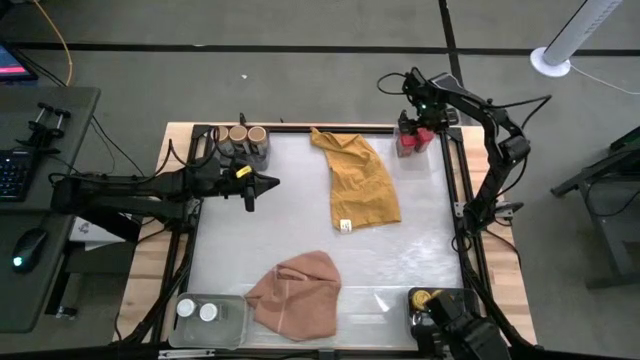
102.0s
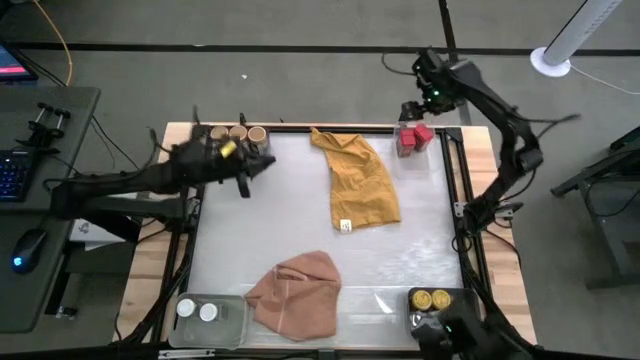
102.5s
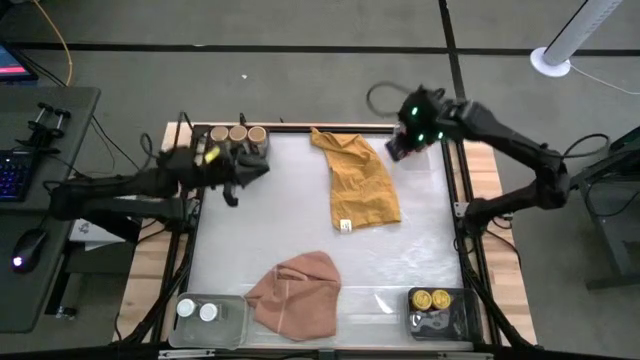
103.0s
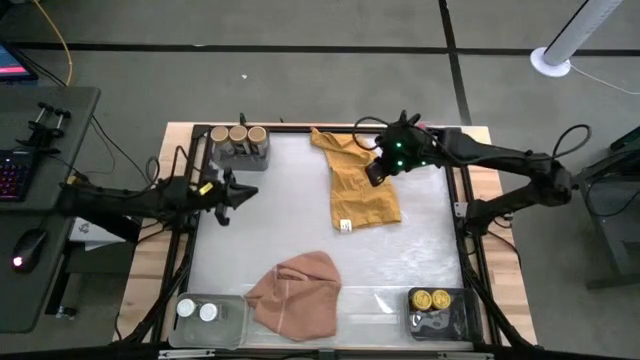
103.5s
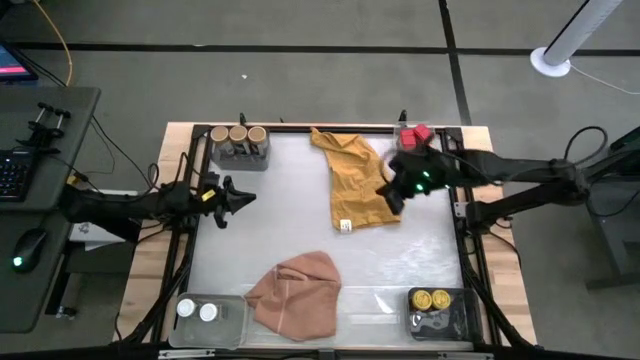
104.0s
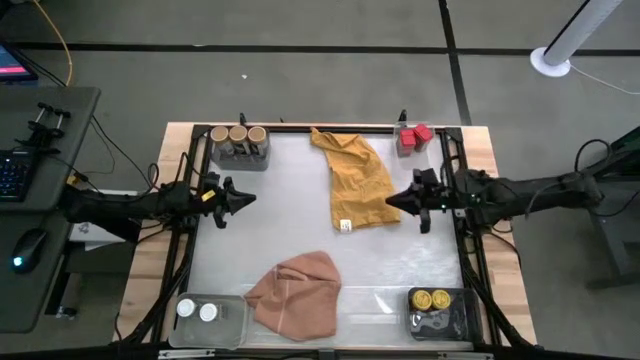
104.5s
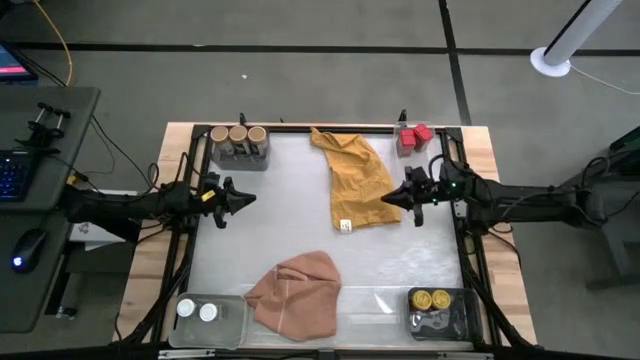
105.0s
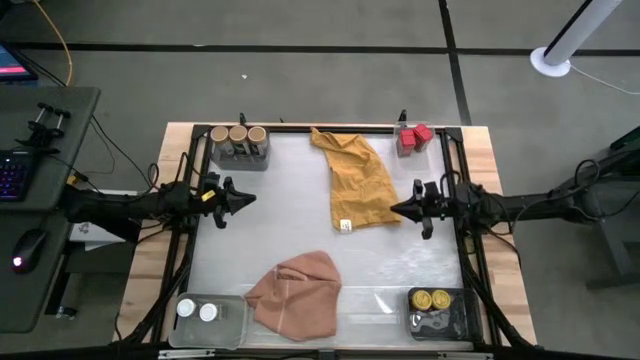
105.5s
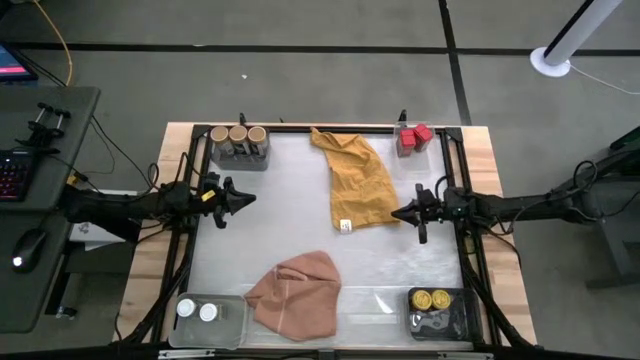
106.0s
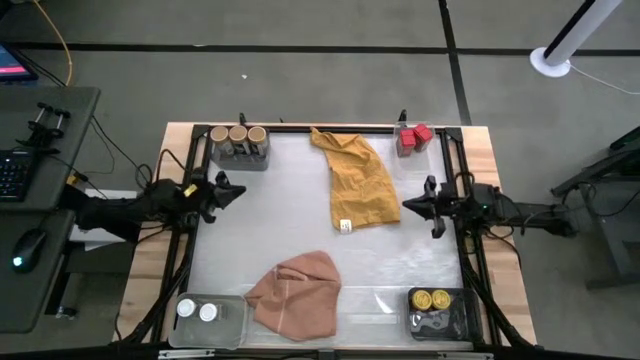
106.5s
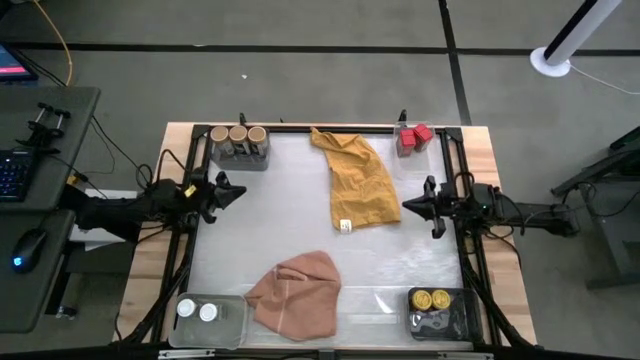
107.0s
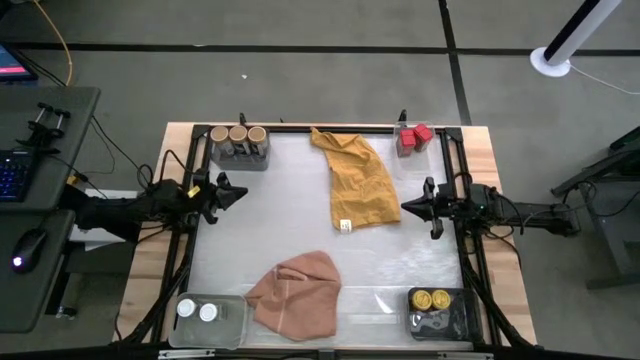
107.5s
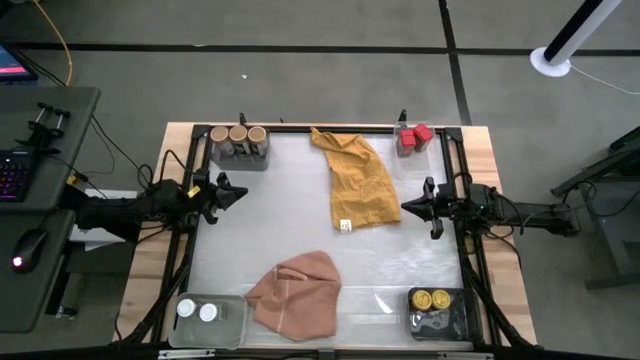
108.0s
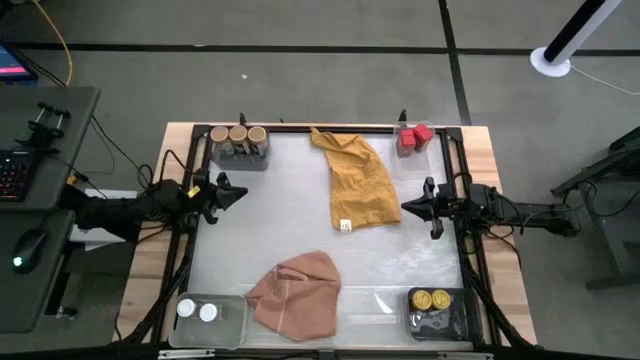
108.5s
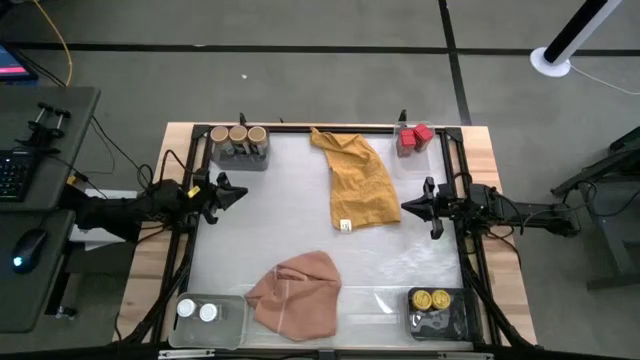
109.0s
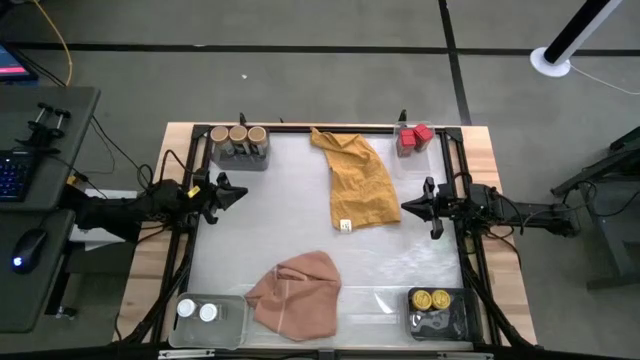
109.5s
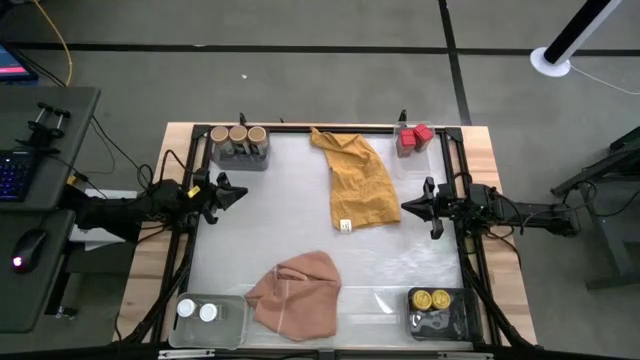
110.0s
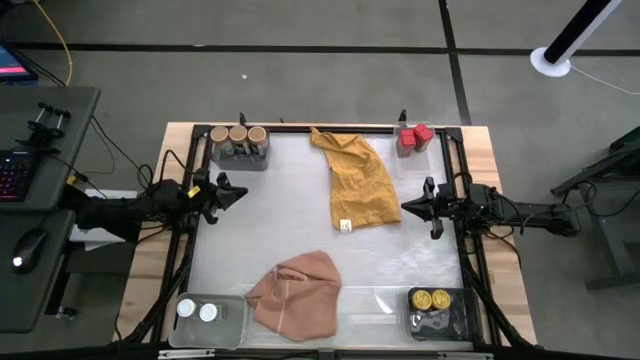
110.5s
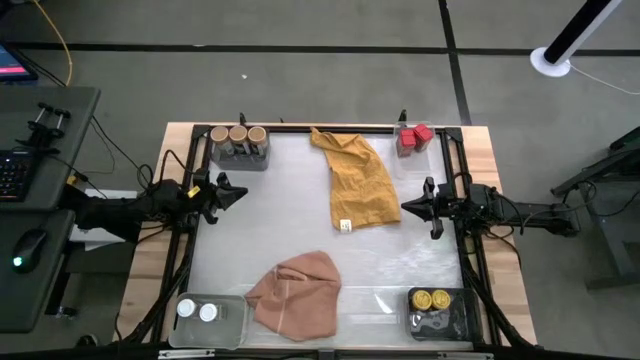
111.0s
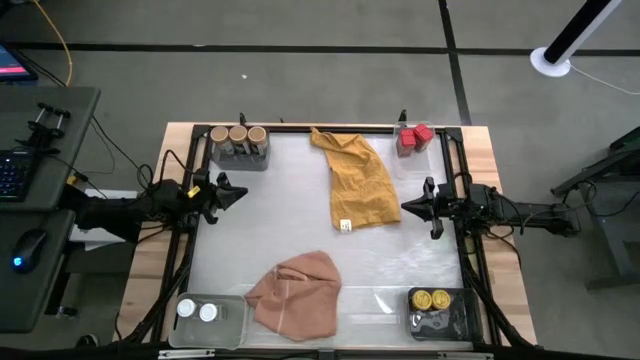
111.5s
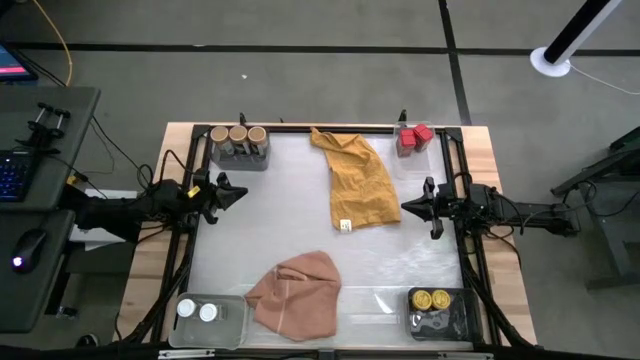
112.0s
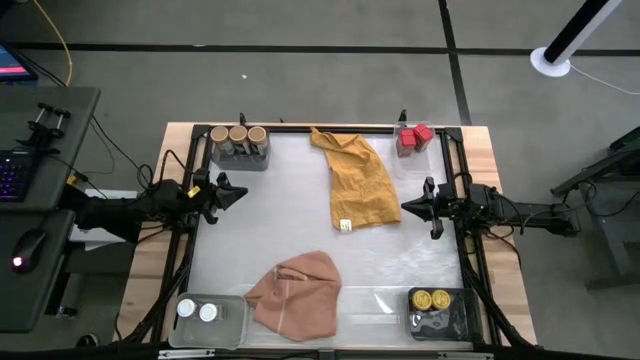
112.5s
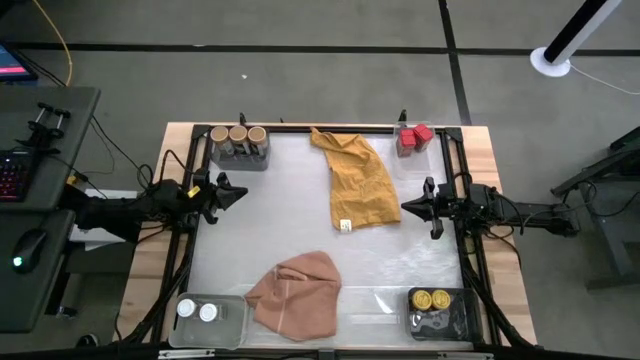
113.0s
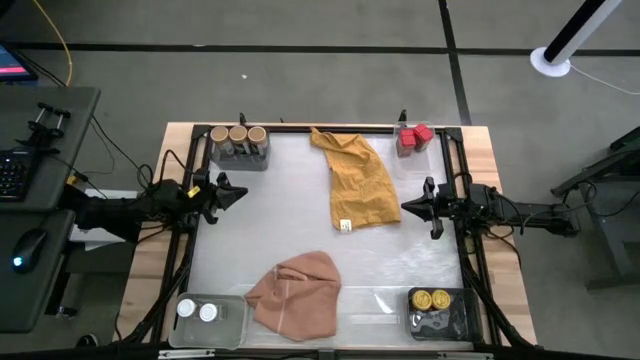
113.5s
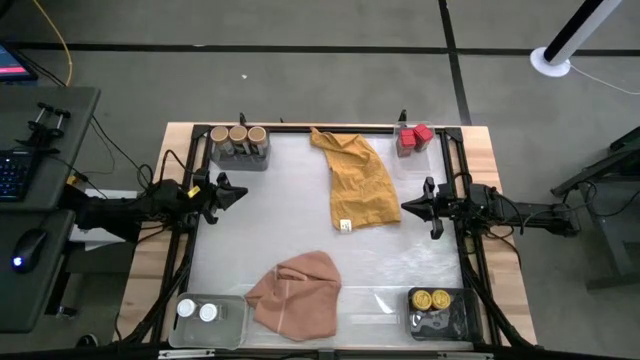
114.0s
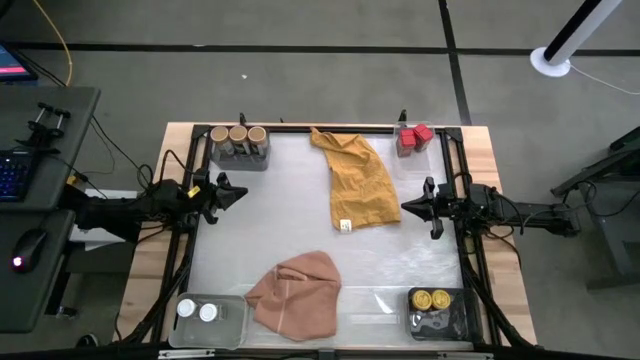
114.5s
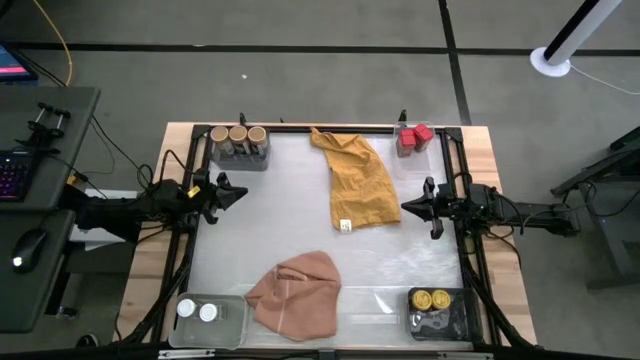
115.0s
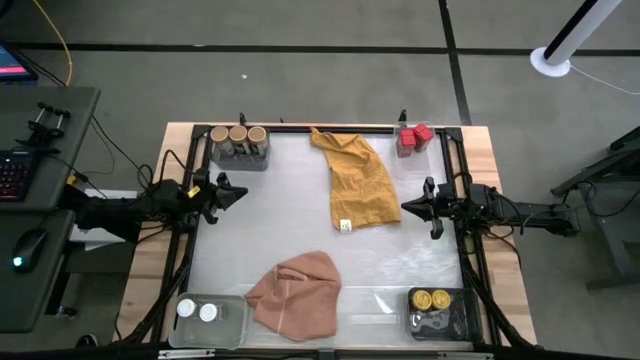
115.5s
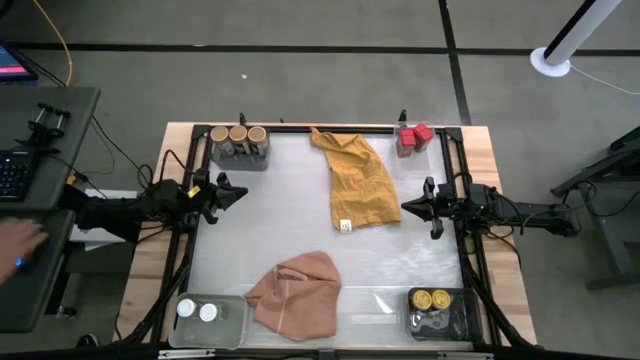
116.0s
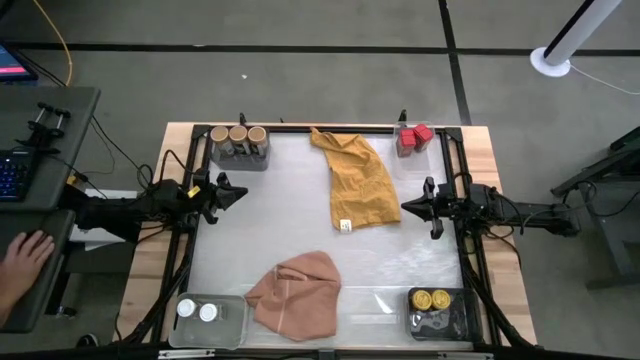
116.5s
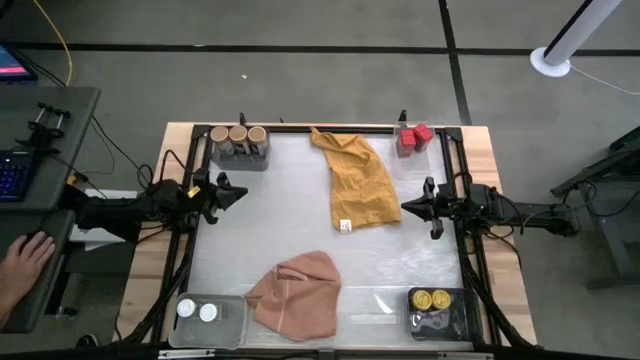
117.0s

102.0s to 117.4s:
Task: Sort spices by type
Return to Home Position

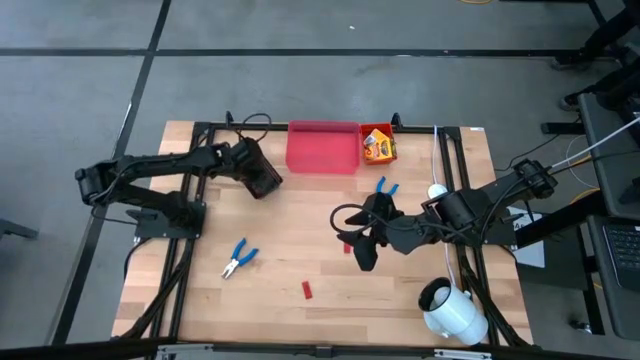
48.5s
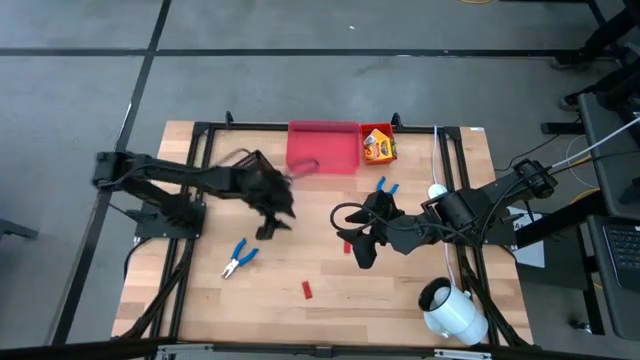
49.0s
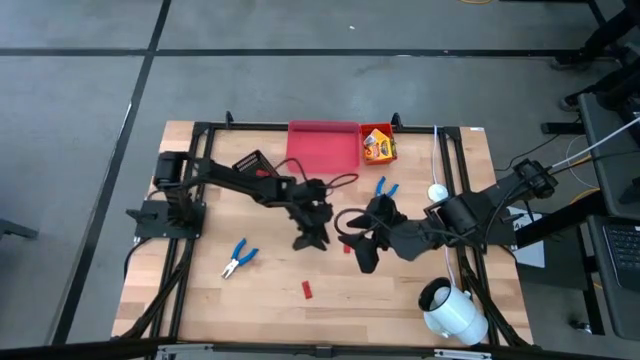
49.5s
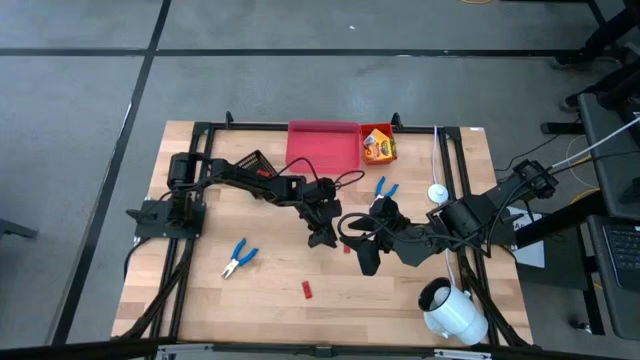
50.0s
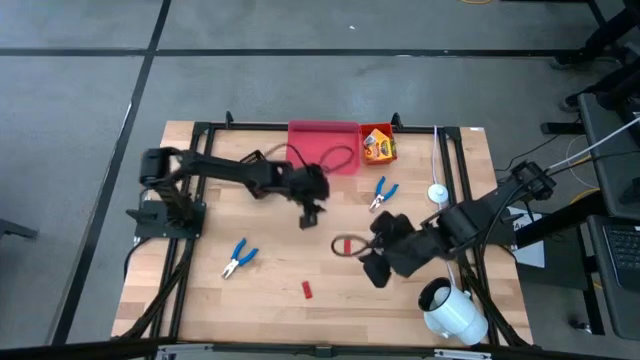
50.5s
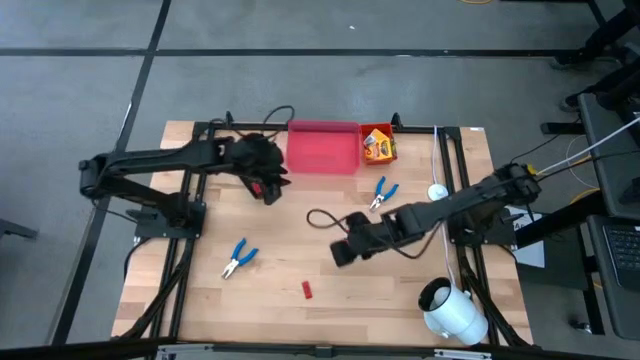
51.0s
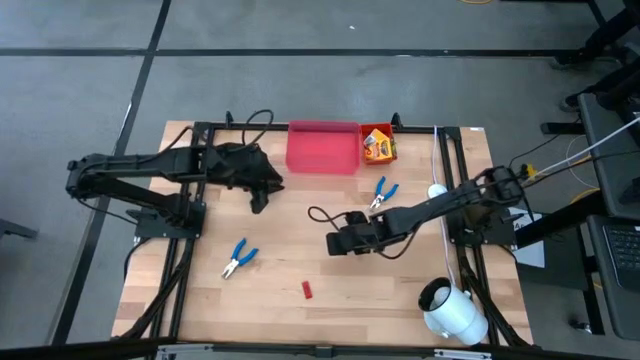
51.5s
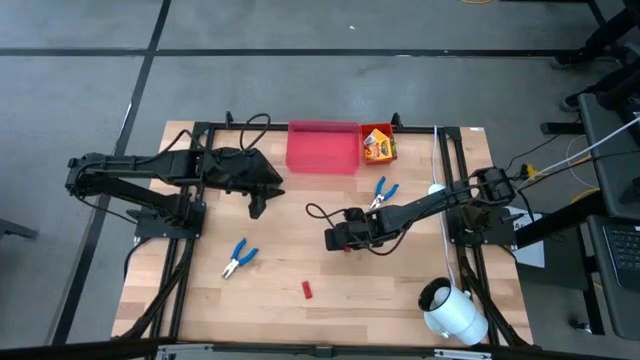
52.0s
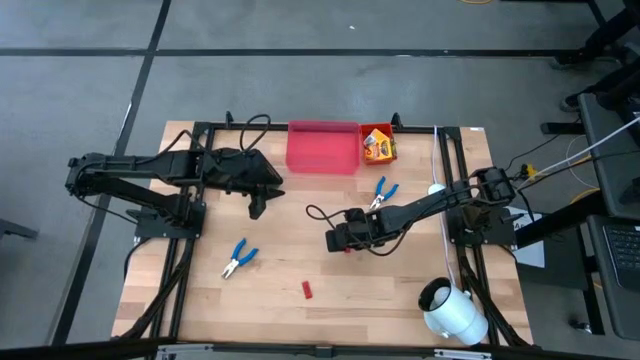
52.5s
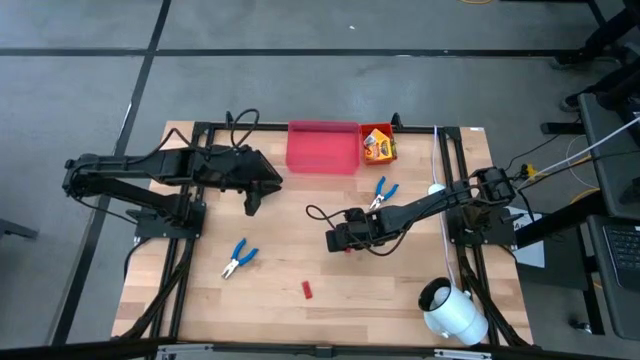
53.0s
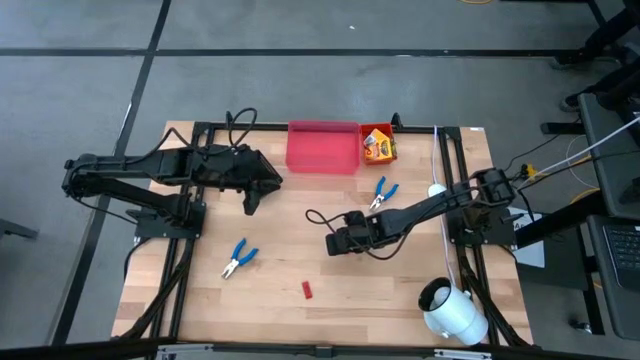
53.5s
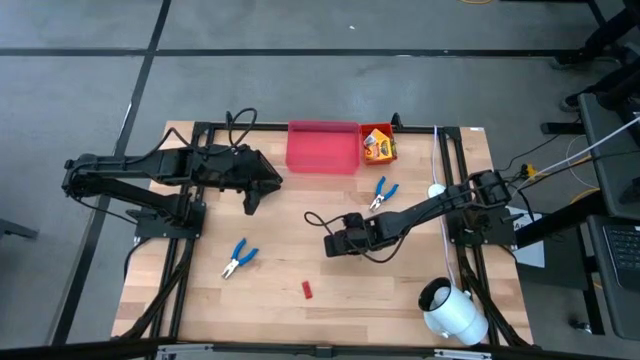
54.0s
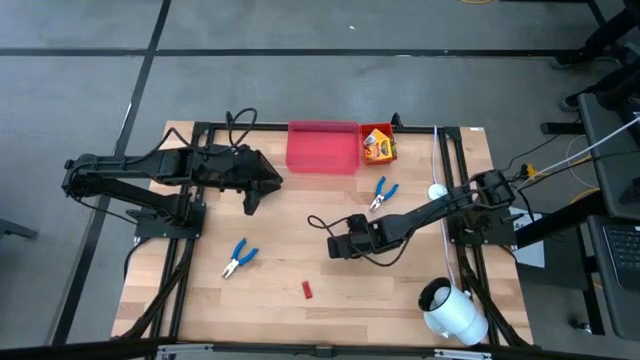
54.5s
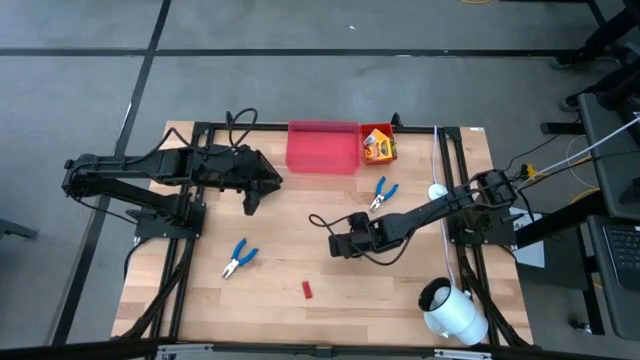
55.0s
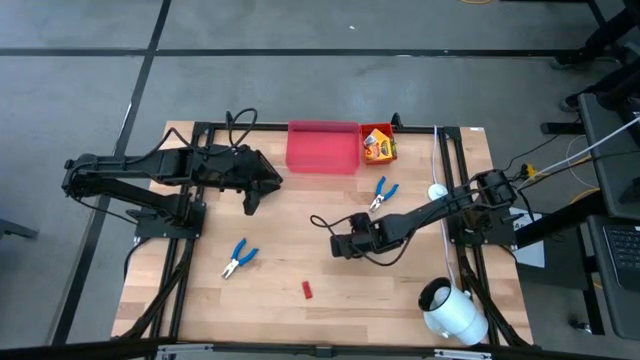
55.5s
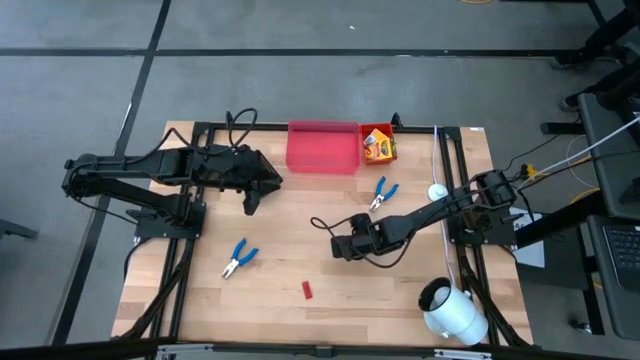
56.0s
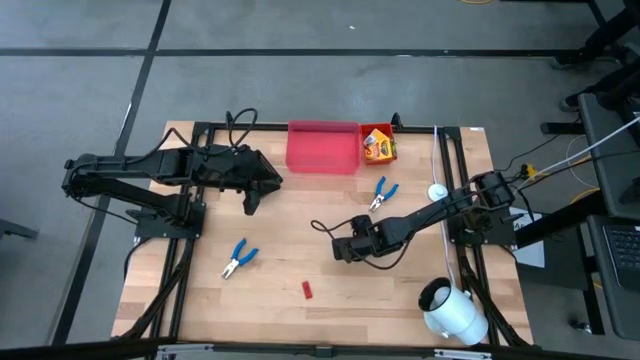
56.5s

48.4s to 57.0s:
Task: Pick & Place School Supplies
Put the red eraser into the black bin
